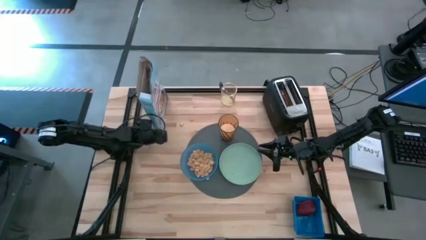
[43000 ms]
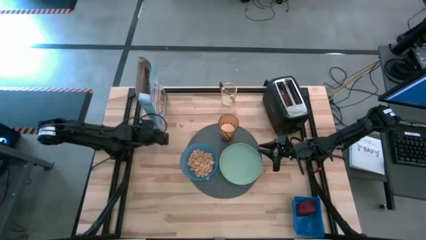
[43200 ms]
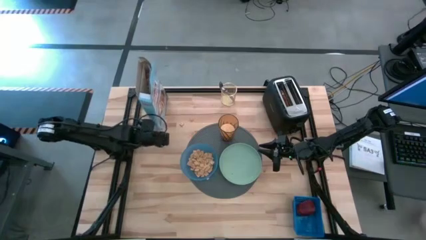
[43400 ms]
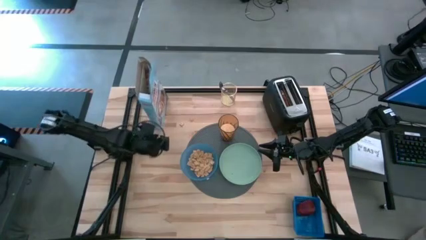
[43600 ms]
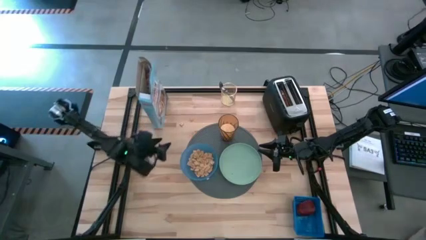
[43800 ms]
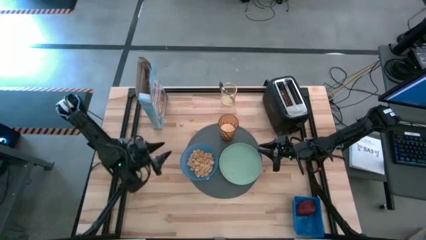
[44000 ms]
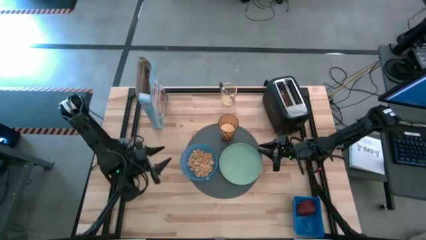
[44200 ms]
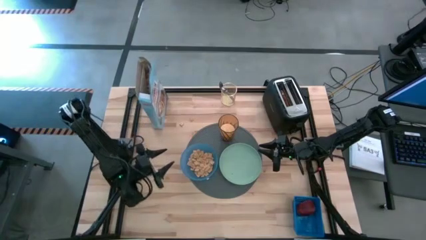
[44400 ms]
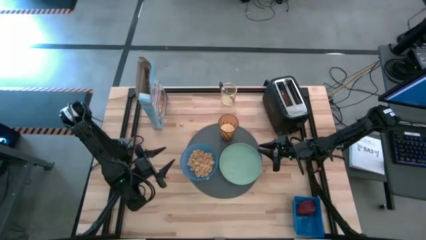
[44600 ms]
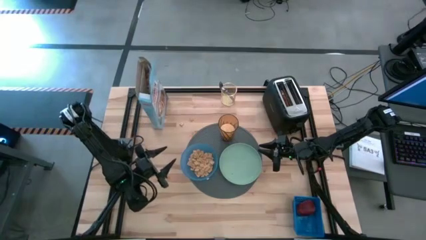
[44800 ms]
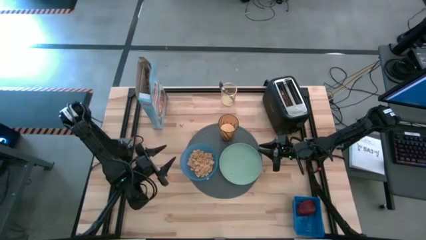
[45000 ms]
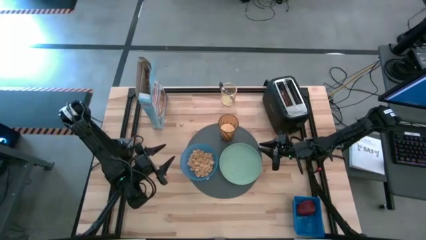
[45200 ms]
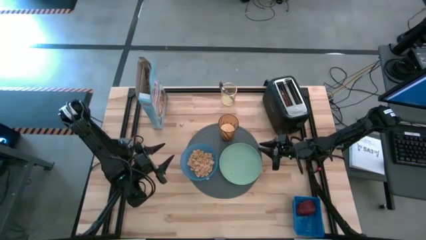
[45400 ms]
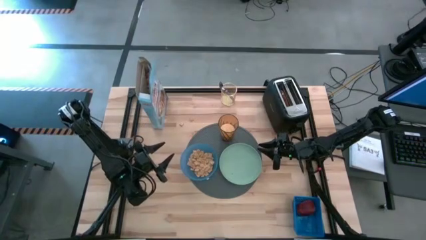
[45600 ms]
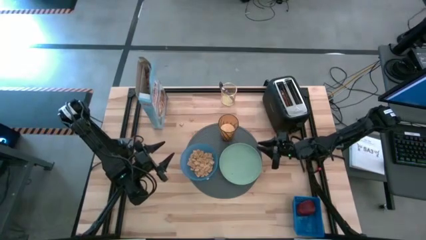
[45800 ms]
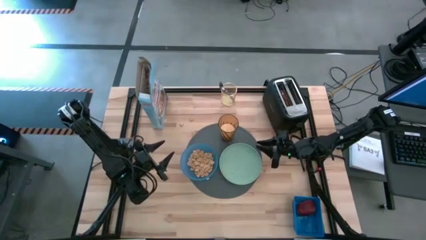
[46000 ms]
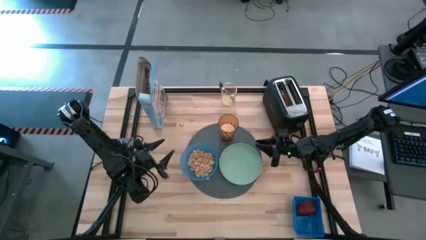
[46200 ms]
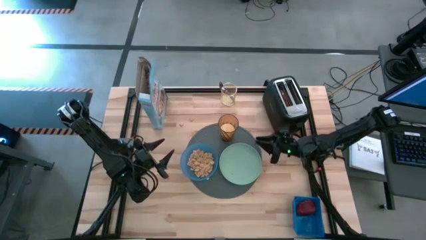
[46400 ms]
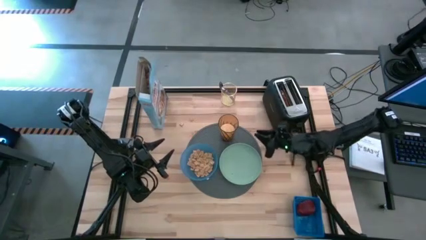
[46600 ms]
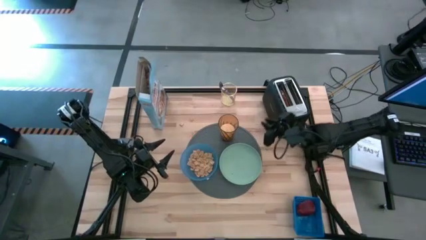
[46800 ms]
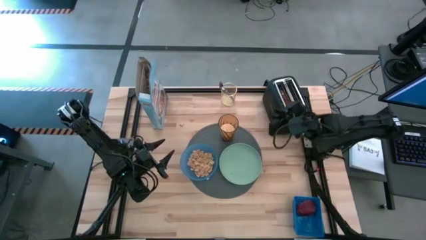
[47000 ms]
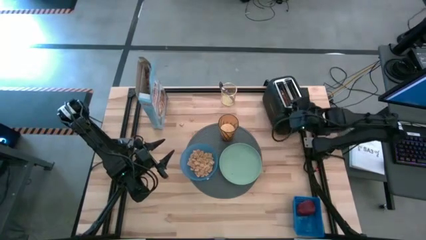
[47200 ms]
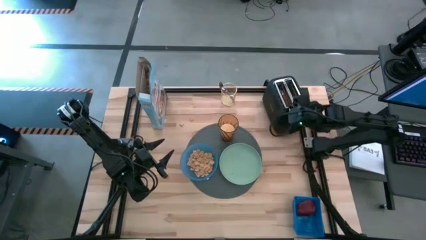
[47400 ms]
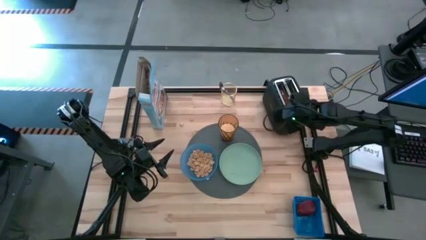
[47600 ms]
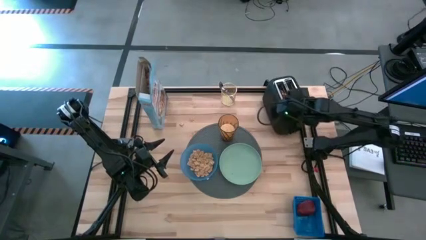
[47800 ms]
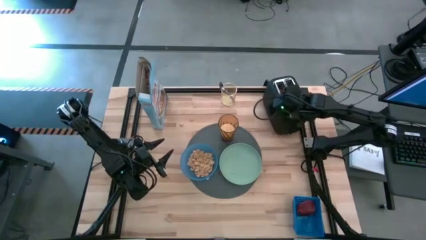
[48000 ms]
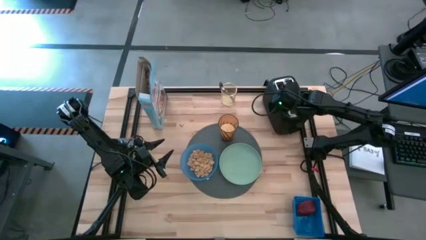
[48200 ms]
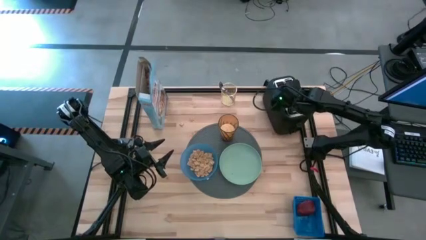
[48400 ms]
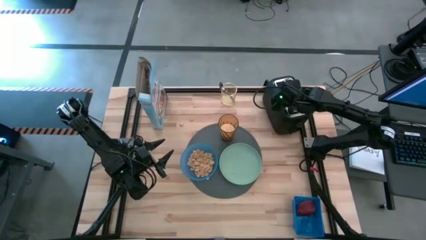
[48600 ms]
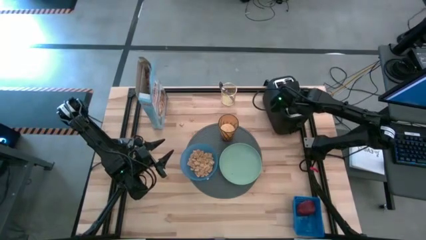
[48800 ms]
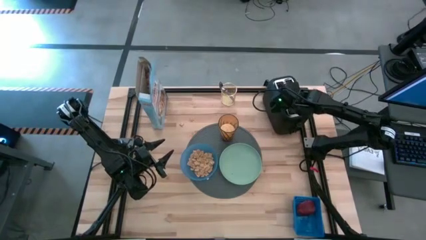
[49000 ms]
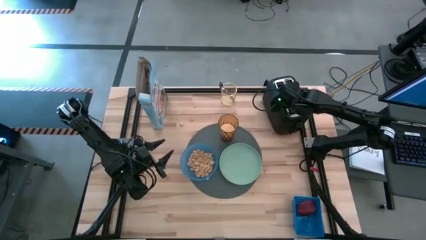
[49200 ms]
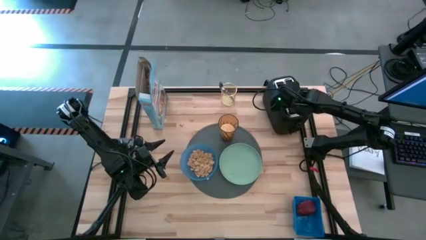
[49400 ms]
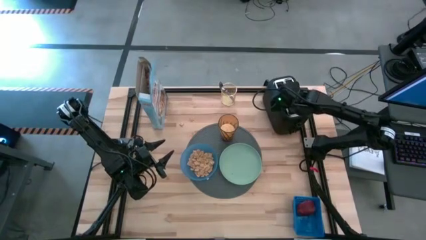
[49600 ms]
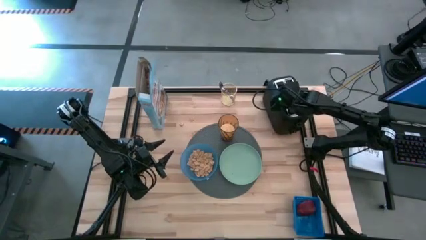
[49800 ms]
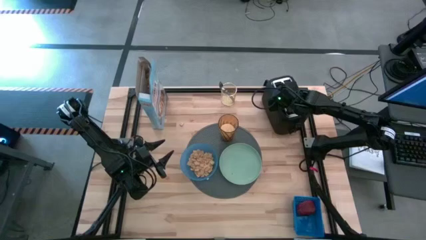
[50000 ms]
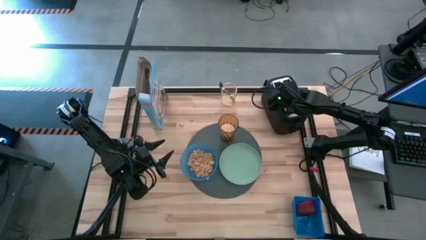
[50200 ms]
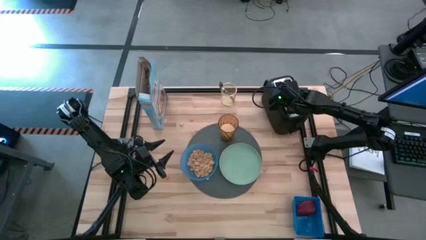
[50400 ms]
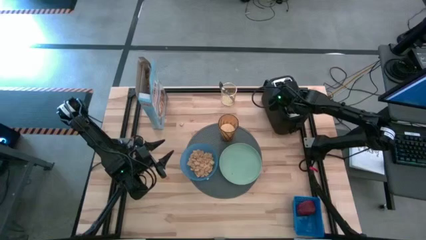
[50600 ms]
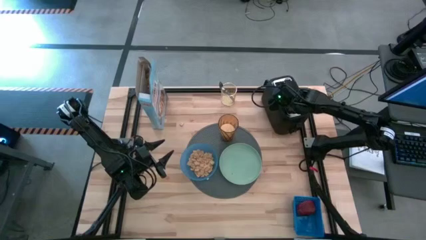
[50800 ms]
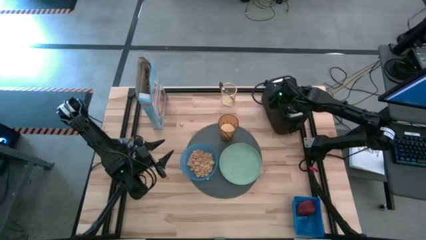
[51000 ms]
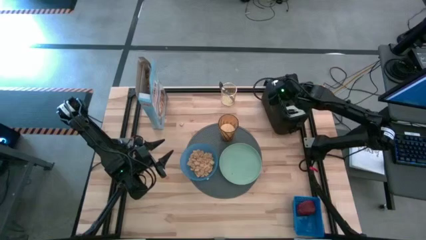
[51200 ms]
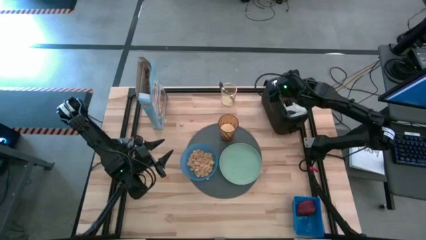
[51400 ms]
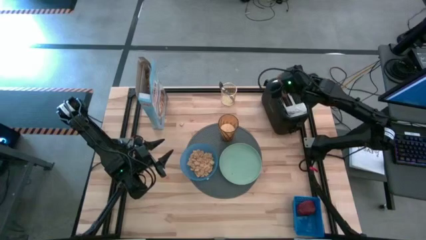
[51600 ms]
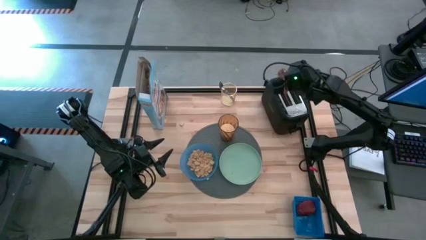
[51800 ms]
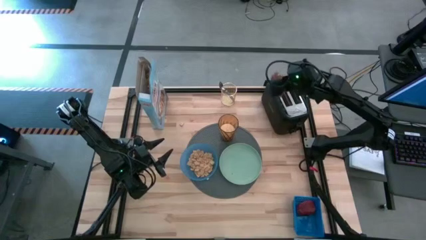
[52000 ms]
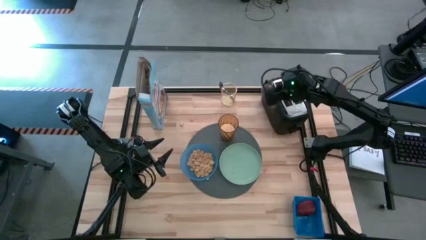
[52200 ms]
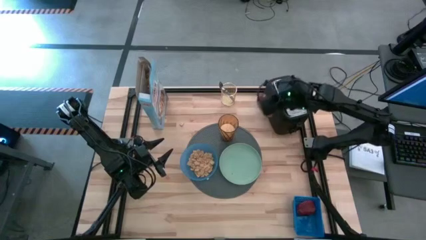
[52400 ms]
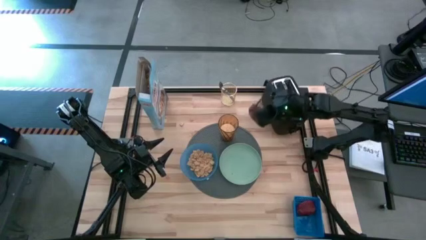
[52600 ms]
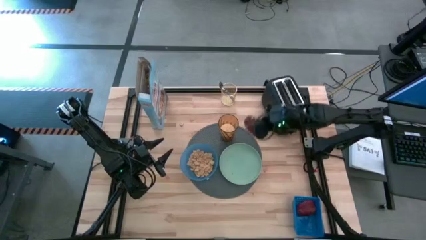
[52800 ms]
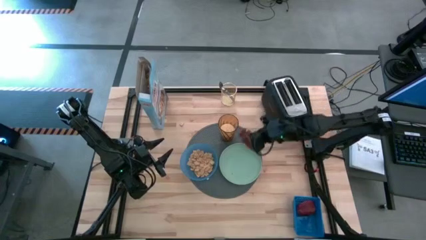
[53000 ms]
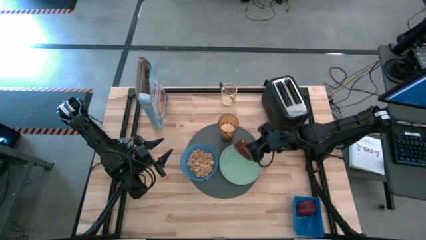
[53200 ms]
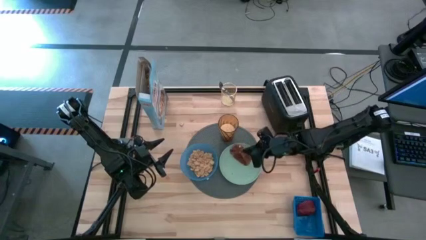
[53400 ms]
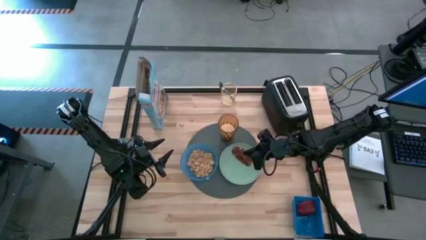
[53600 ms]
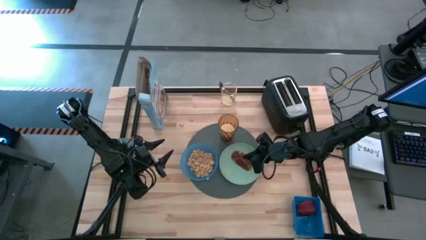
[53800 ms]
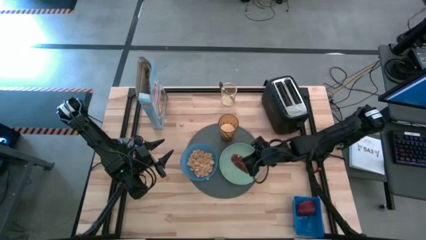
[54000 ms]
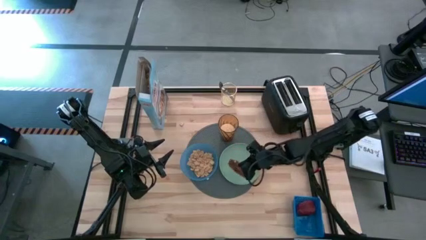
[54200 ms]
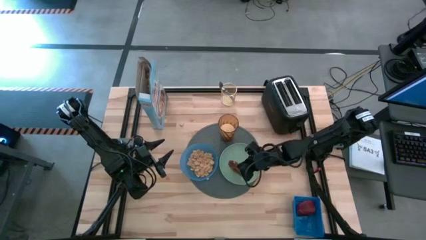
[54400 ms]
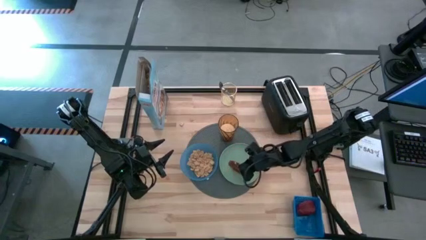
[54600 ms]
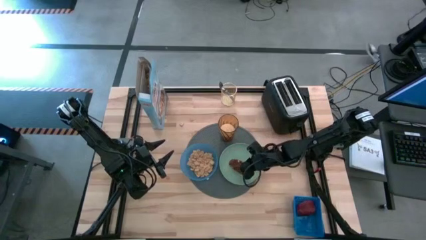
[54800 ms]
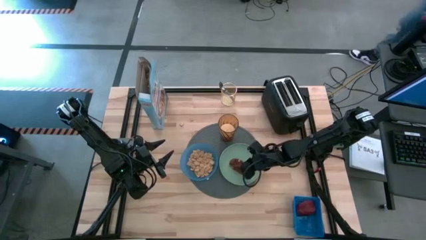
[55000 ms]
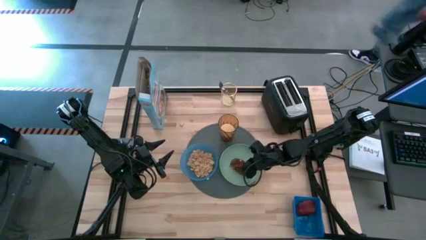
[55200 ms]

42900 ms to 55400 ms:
Task: Arrange a breakfast setting
Put the toasted bread on the light green plate from the toaster
